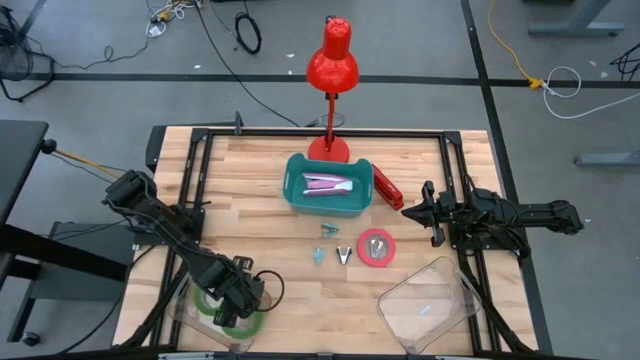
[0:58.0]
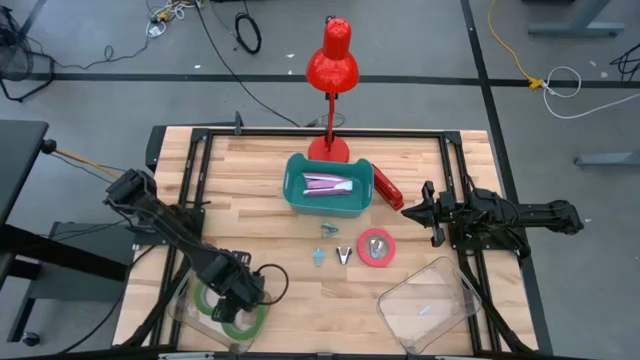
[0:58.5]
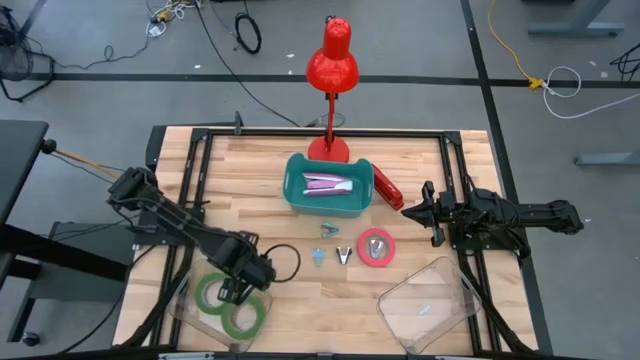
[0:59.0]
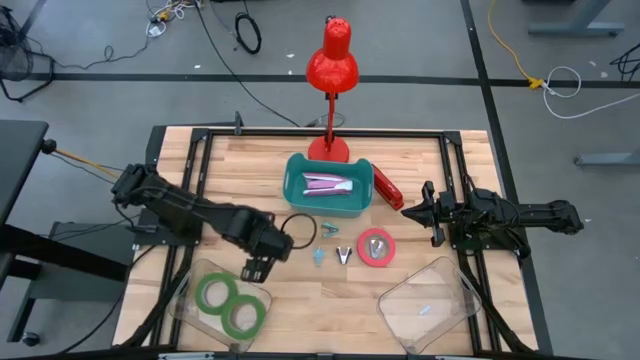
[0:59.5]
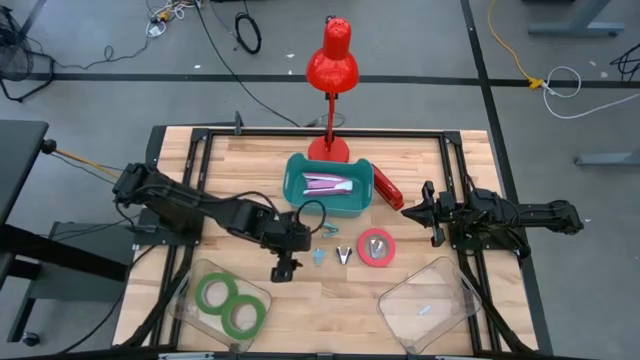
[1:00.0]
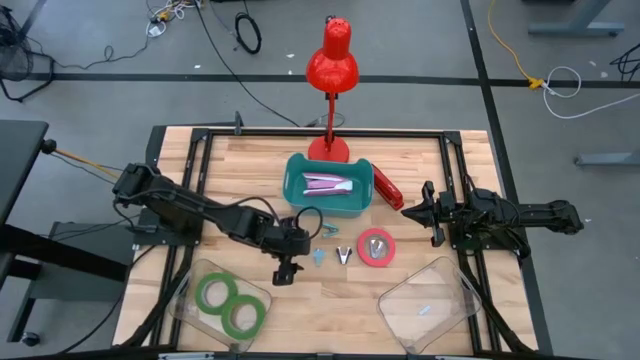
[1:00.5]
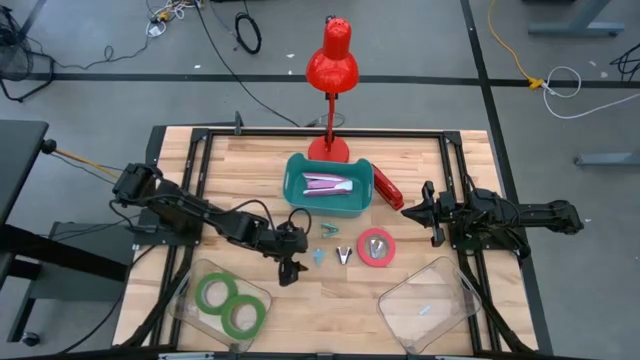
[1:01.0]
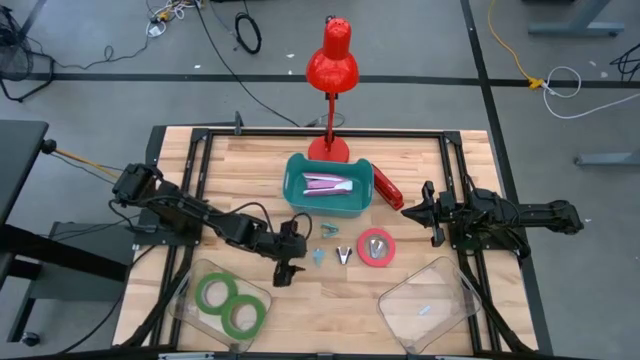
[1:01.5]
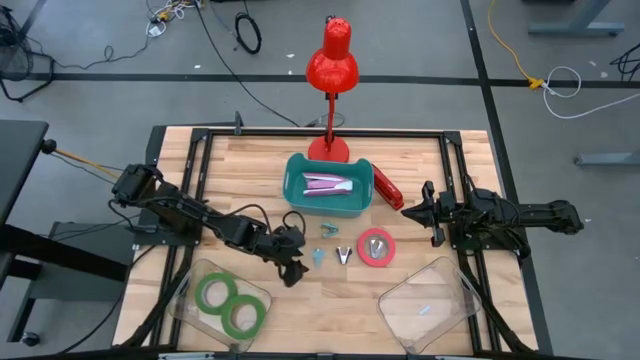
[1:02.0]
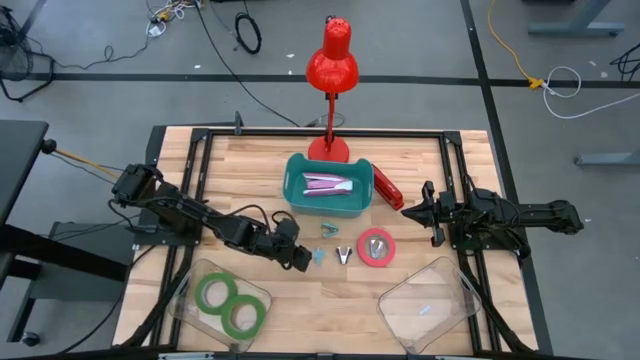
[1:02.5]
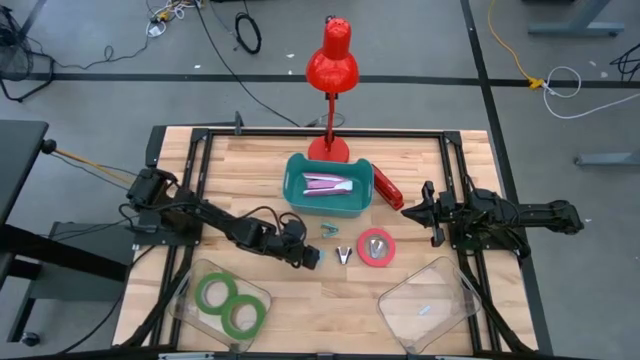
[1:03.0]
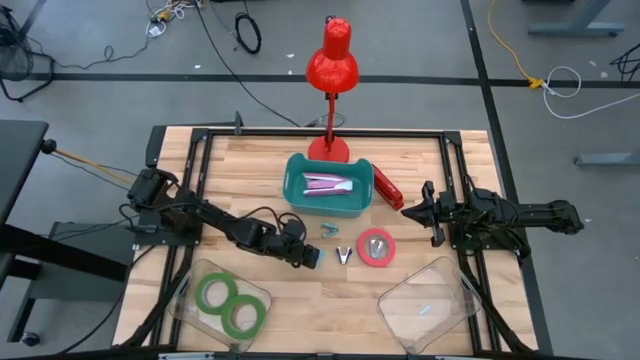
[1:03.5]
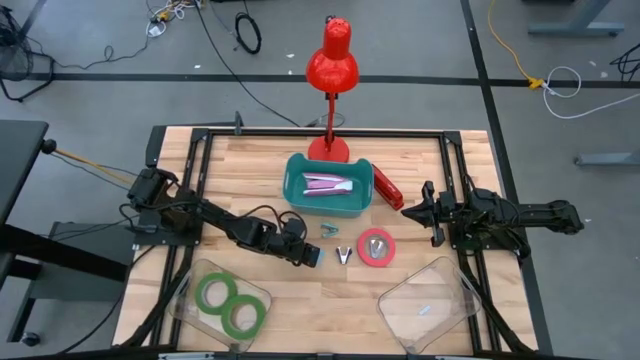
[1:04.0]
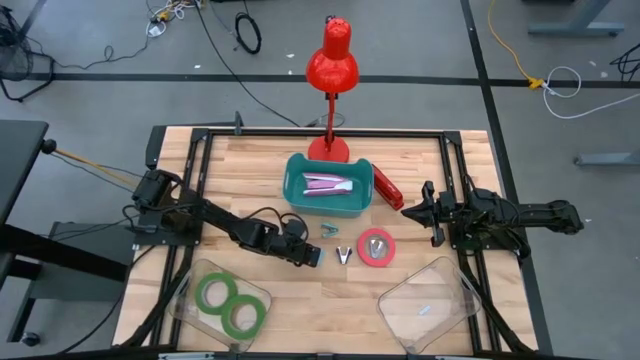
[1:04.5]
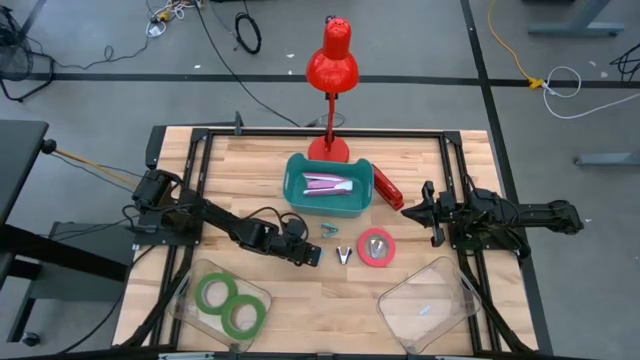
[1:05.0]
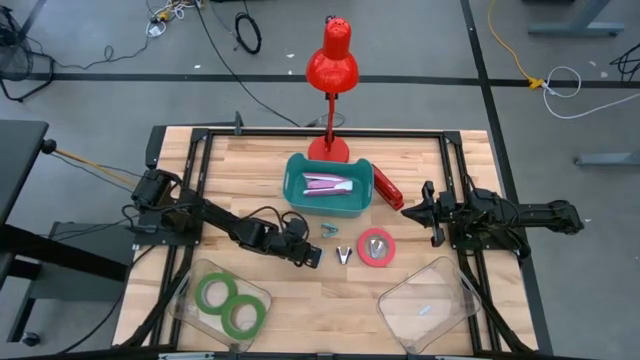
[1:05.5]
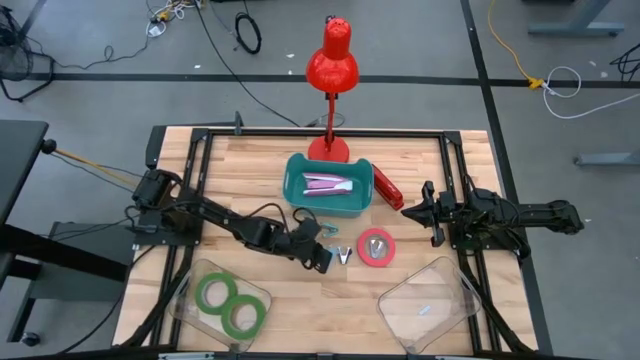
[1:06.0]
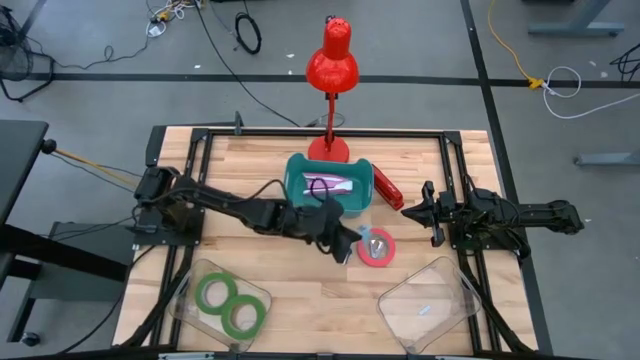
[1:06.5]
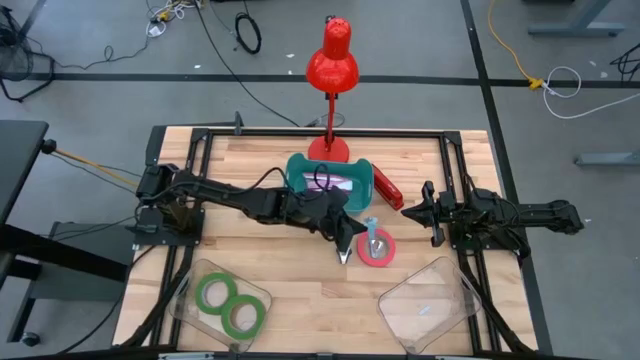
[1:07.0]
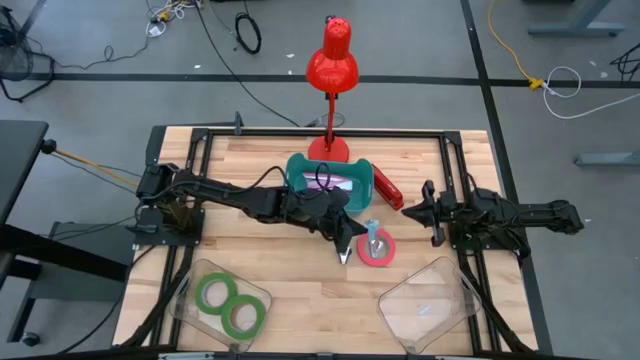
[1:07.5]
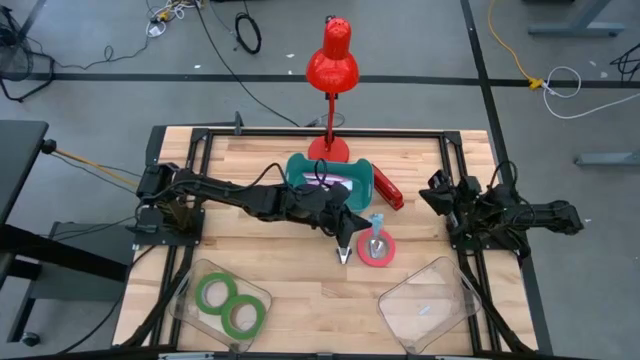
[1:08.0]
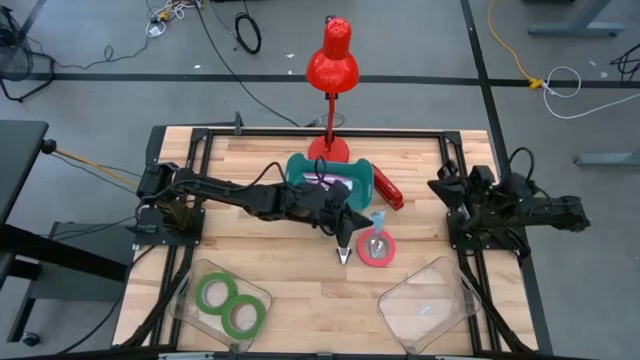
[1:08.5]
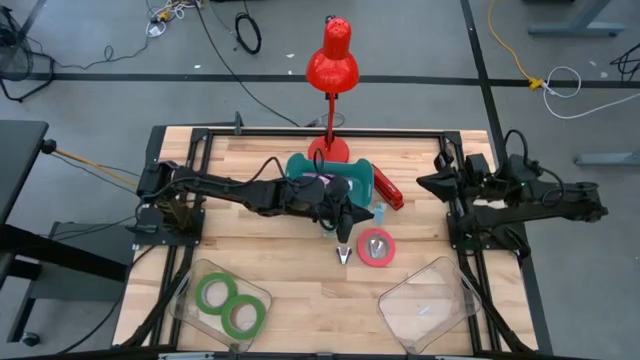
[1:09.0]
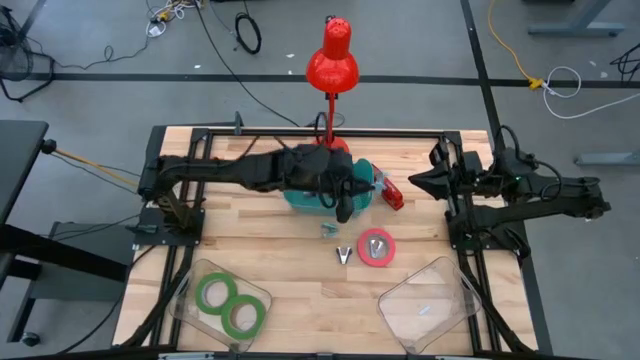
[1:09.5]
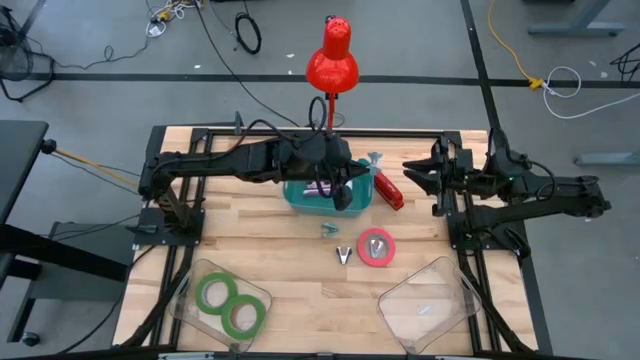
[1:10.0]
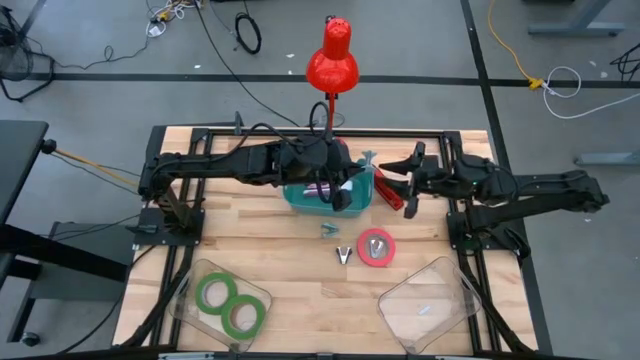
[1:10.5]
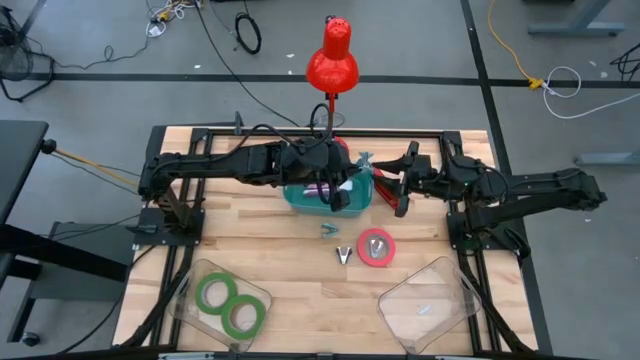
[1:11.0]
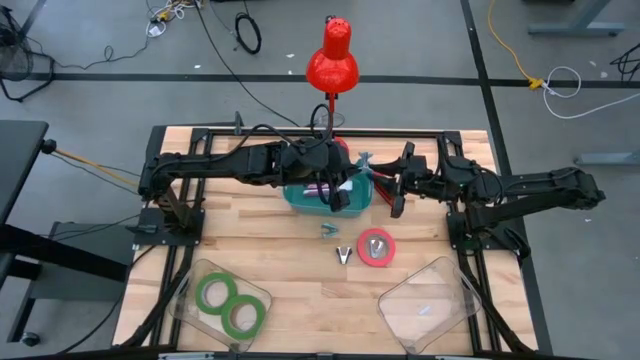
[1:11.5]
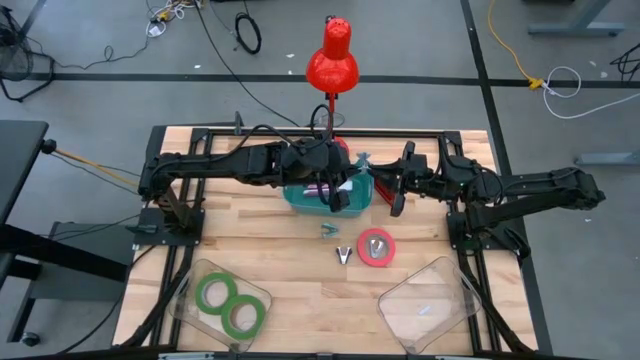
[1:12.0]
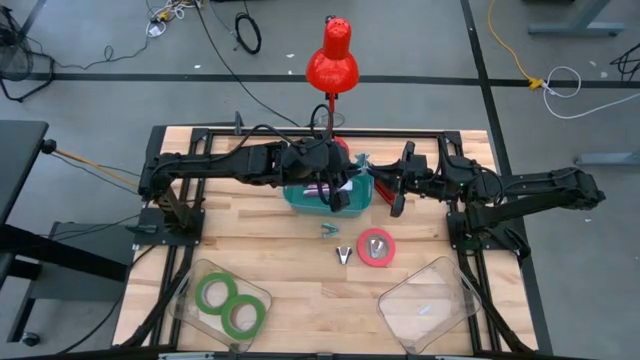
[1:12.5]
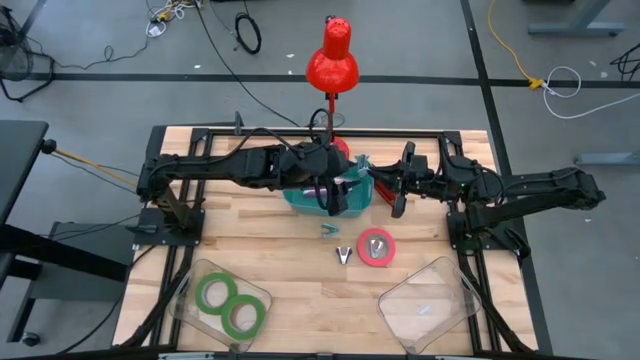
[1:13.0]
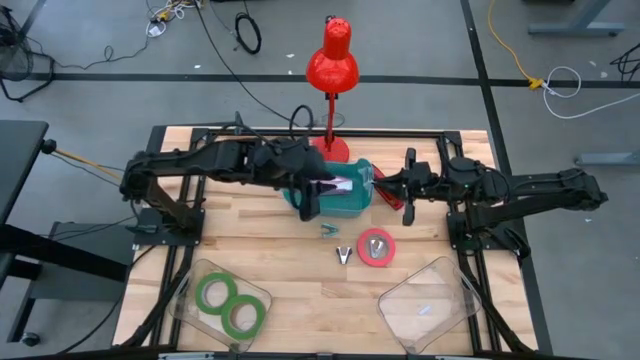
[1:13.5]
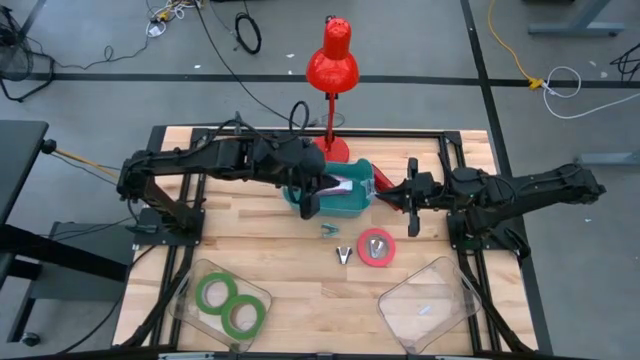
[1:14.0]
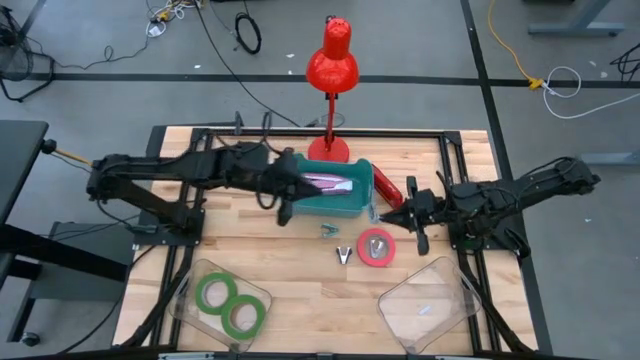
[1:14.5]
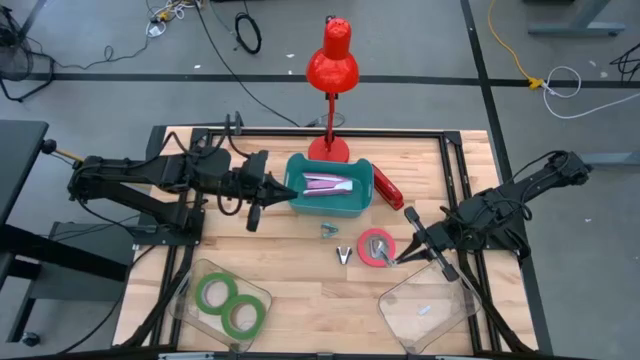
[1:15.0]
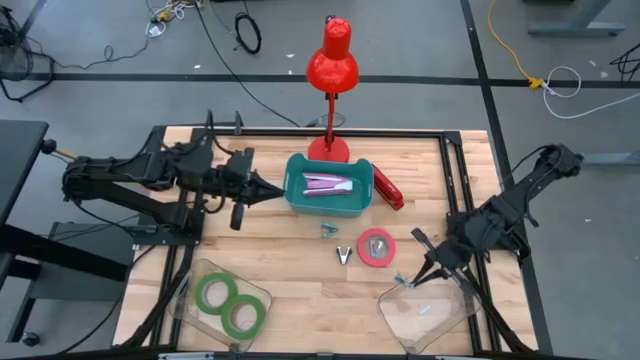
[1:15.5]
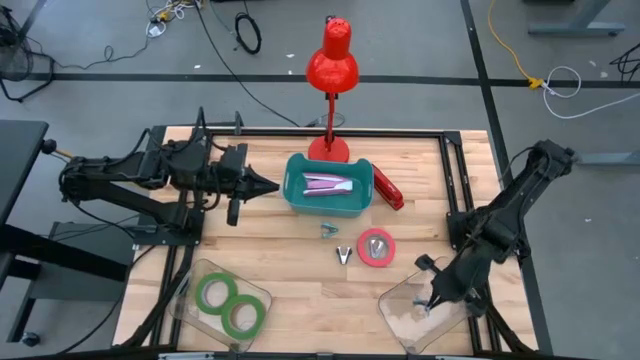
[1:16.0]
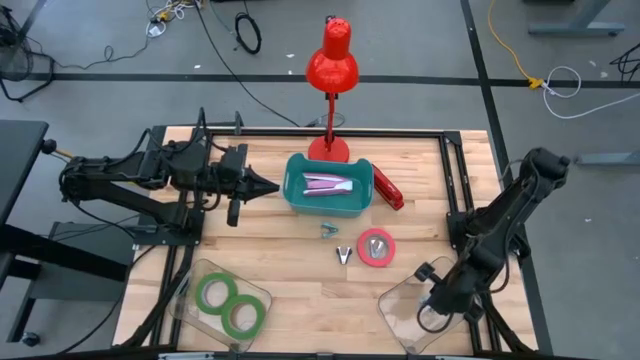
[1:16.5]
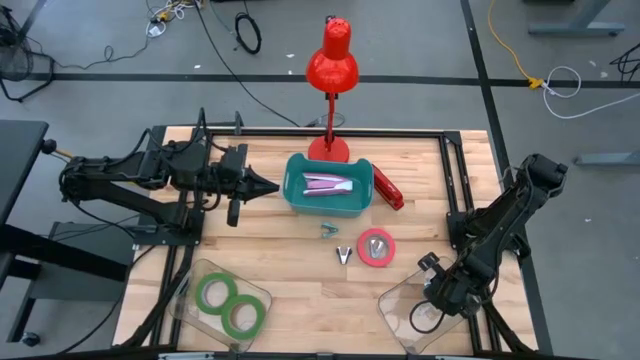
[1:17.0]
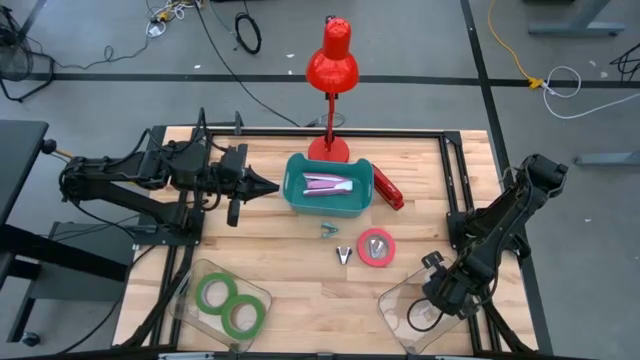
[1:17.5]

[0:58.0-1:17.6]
Task: Pick and place Stapler, Stapler remover, tape
Put the bottom light blue staple remover in the right transparent bin
